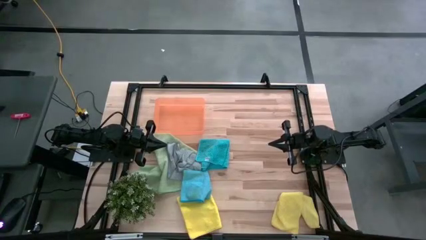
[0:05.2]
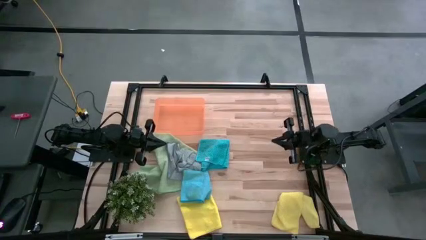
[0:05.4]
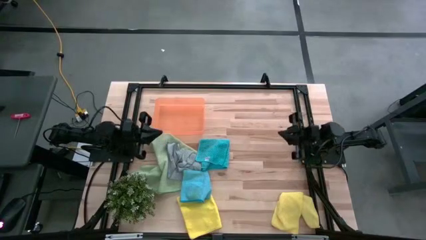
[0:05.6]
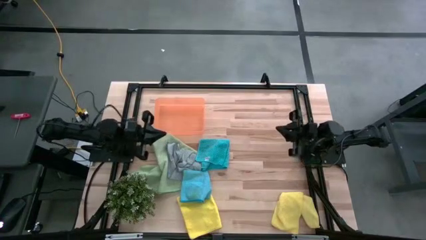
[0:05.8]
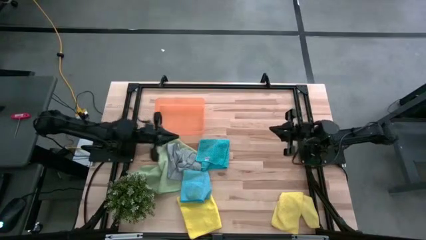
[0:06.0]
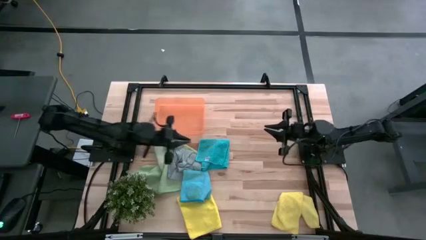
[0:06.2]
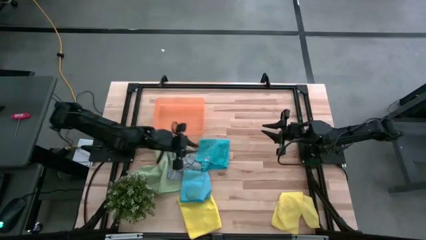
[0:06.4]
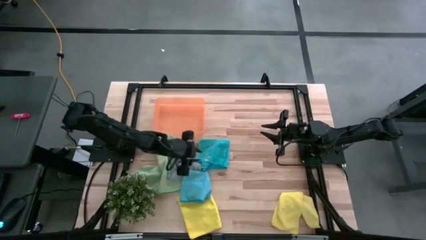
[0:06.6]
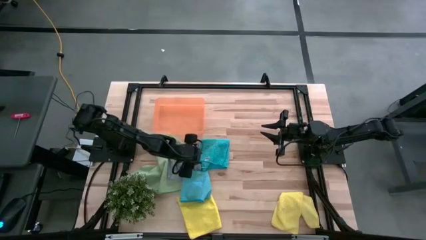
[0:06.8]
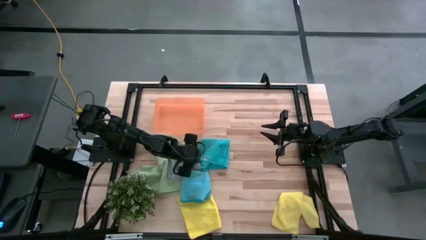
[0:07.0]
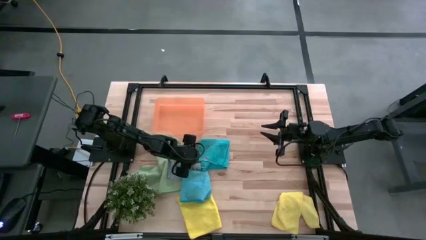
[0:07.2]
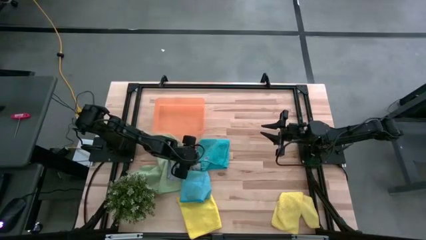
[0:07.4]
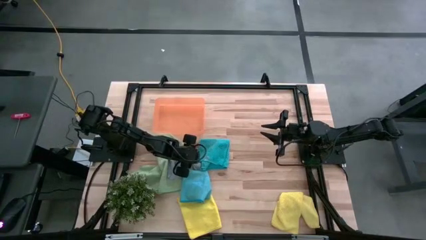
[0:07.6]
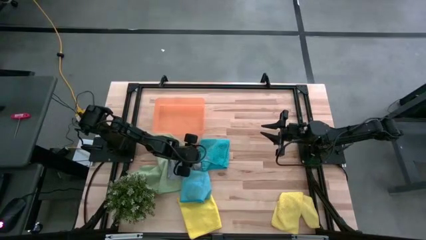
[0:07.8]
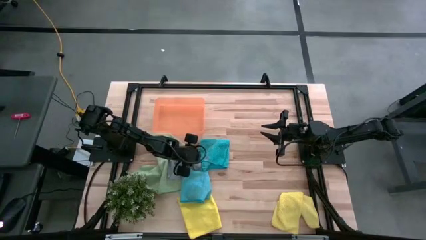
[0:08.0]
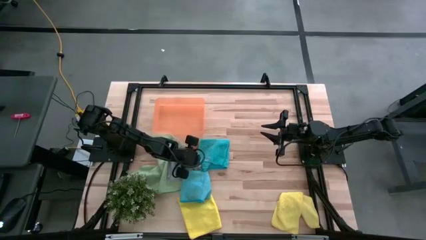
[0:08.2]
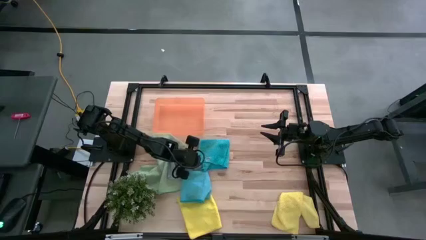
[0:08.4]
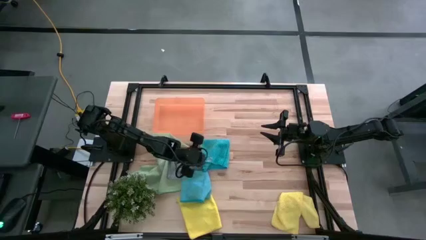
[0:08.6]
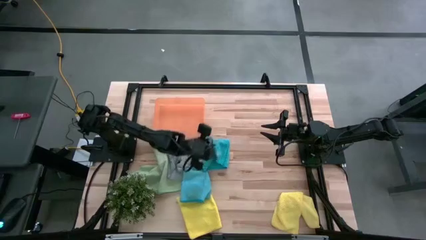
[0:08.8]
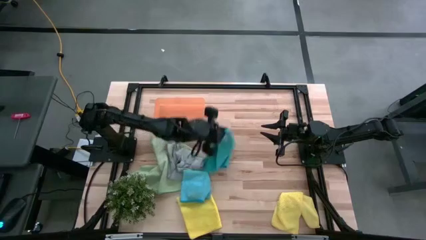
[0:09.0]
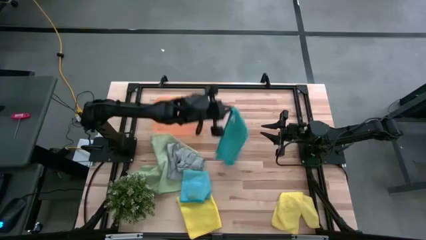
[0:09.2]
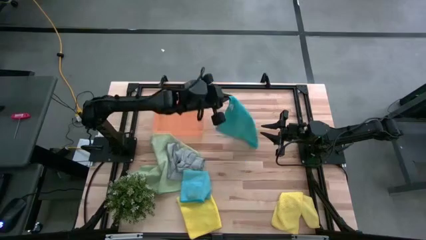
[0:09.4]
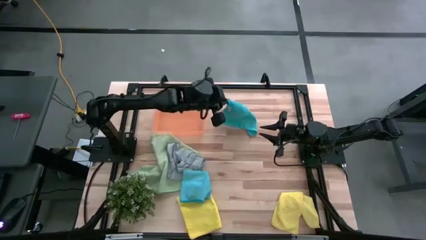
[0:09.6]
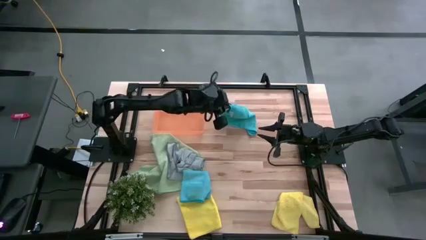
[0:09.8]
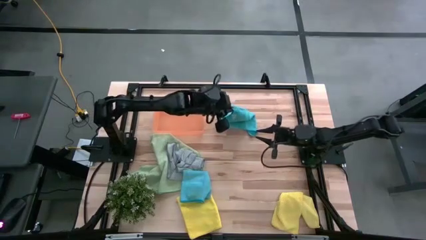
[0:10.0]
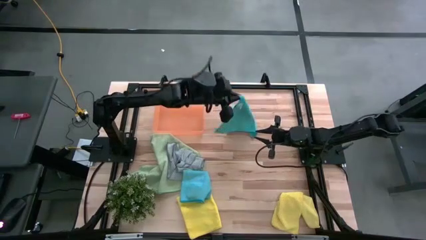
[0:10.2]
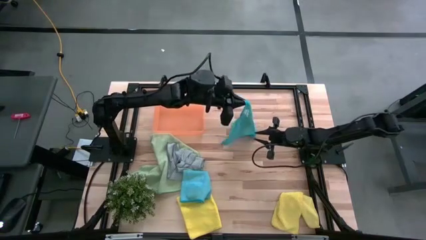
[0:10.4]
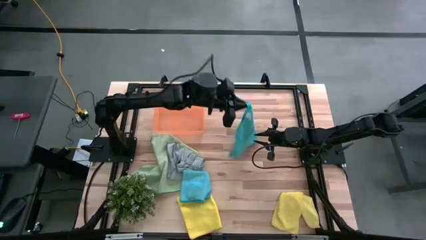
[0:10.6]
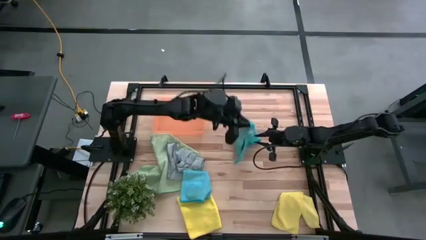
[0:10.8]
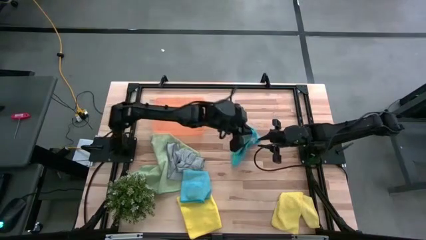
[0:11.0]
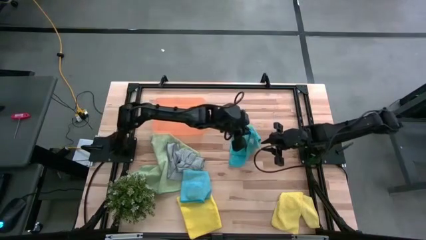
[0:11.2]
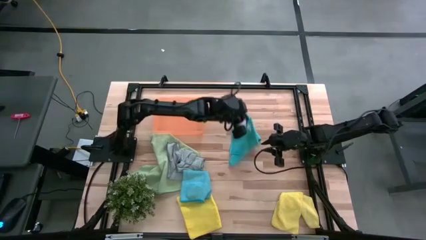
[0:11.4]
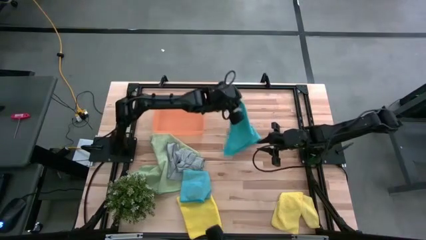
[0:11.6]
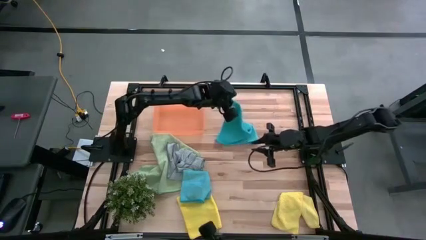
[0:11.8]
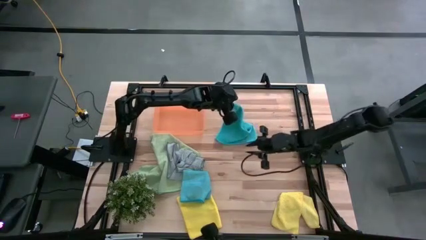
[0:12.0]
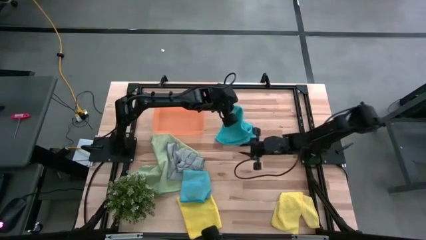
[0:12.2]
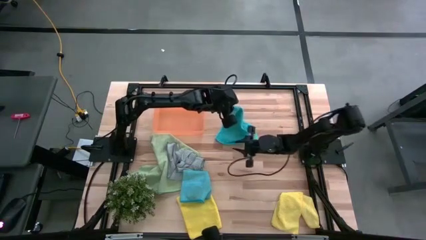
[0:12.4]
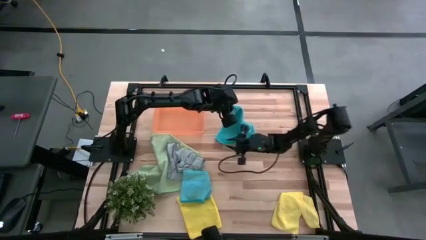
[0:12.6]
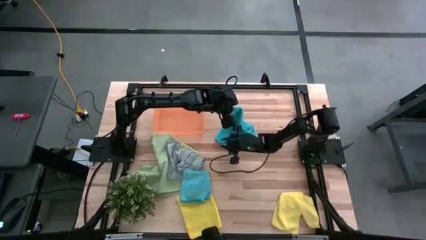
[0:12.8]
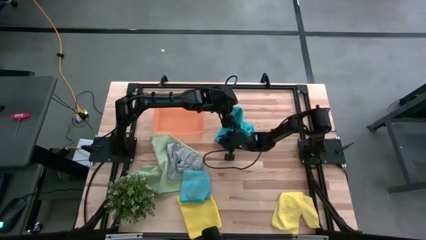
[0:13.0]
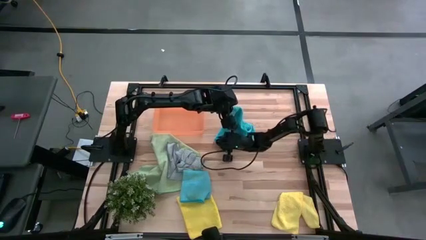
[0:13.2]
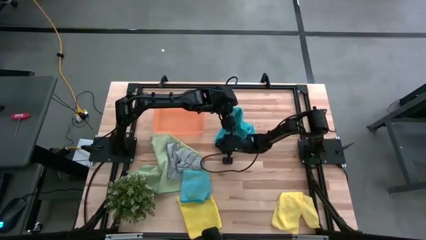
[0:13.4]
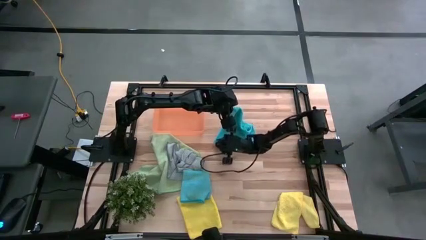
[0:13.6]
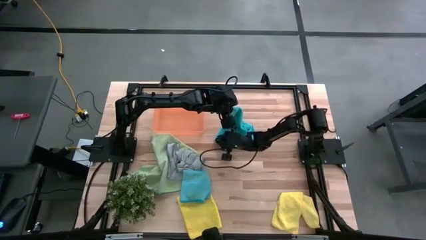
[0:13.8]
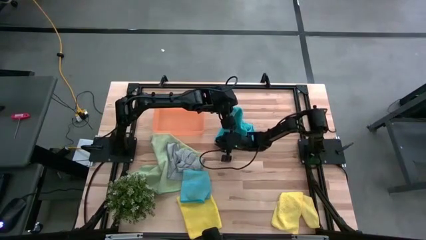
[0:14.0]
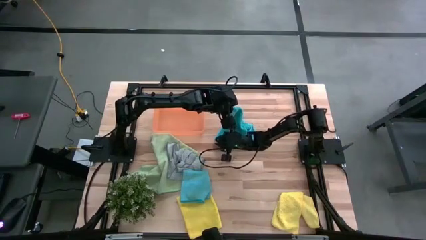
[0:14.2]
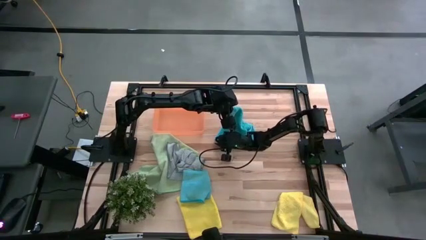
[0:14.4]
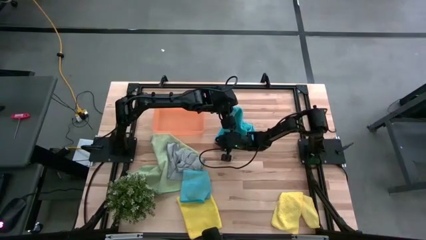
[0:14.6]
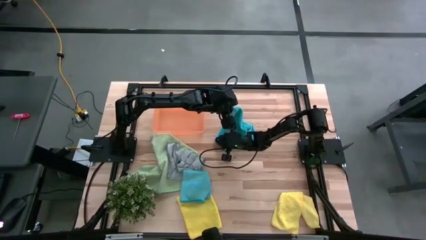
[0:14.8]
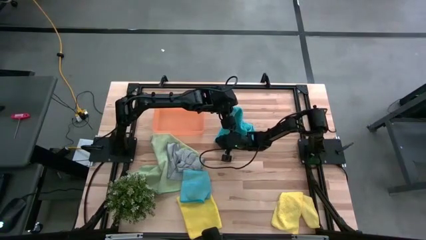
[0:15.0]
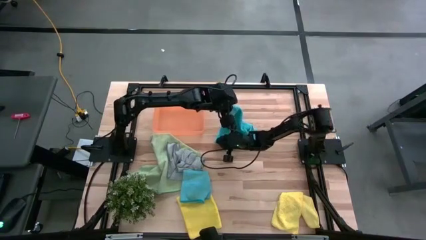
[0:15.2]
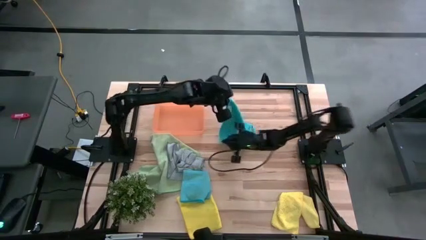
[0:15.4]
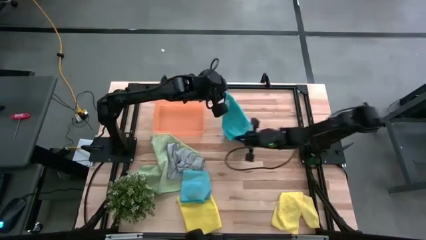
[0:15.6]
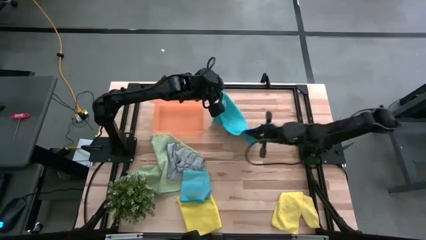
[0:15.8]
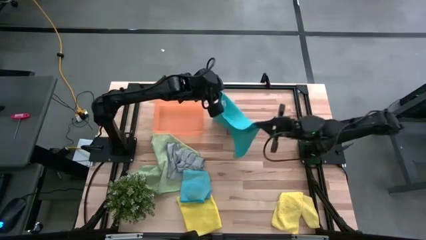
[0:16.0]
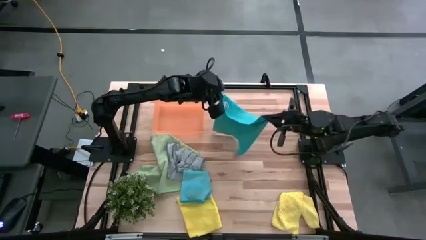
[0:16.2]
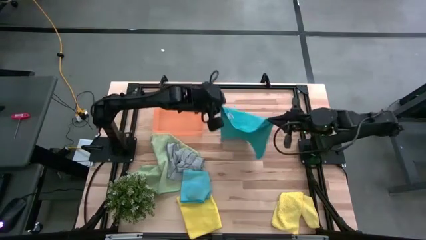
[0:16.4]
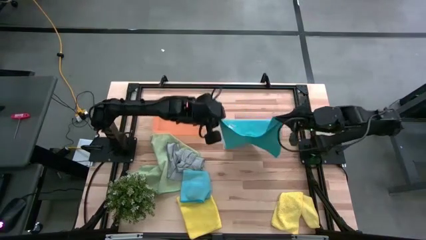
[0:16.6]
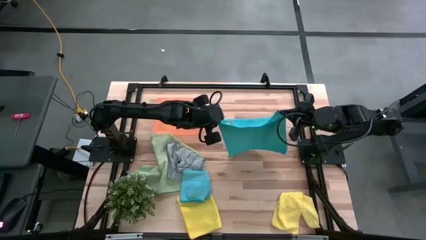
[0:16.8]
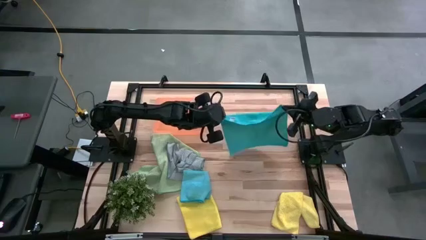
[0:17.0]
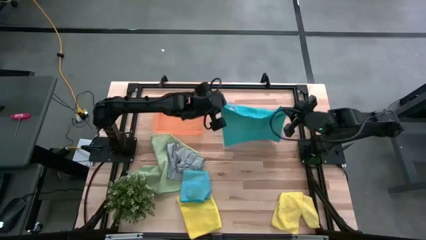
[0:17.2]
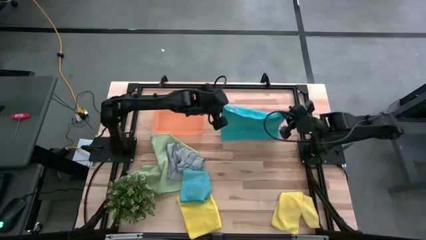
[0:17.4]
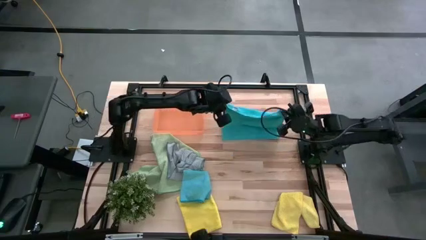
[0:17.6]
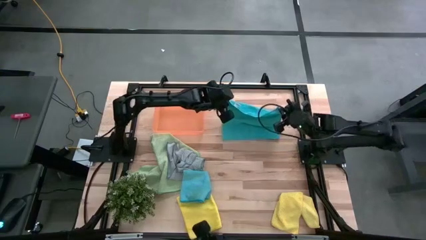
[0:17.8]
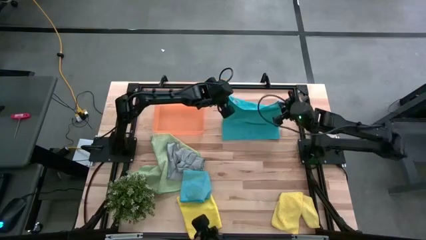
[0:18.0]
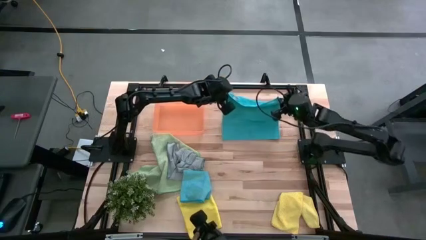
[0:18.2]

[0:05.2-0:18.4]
Task: Fold microfiber towels
Fold the top blue microfiber cloth
